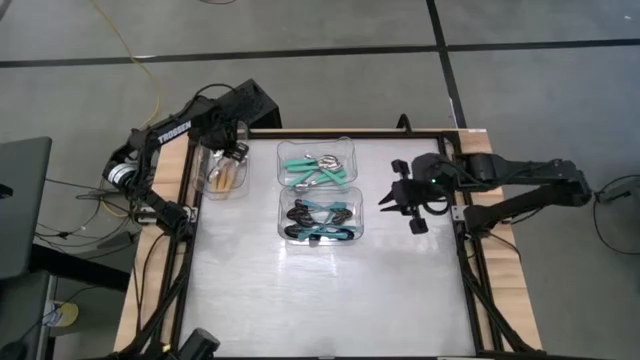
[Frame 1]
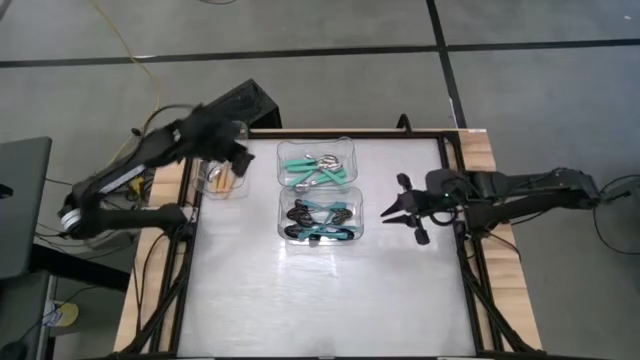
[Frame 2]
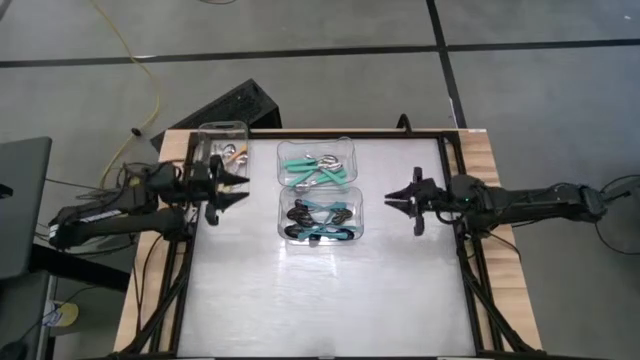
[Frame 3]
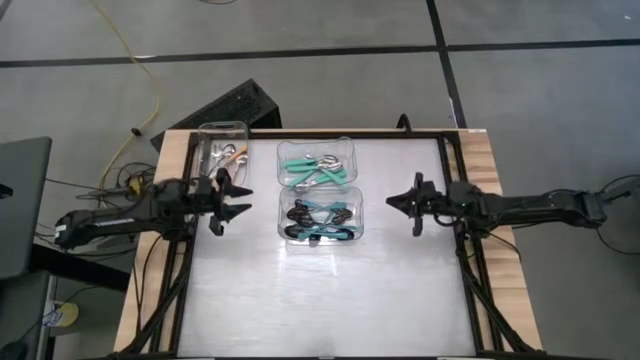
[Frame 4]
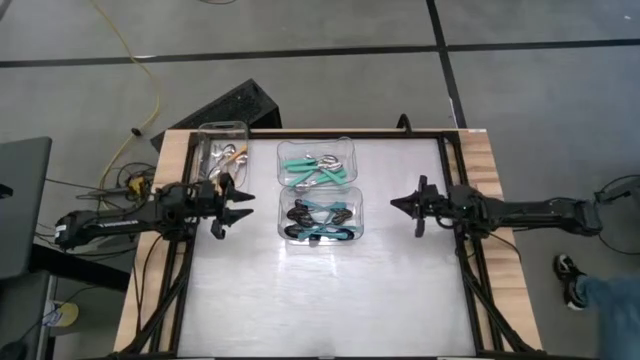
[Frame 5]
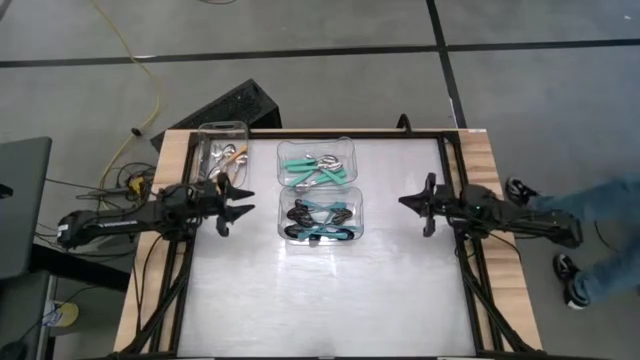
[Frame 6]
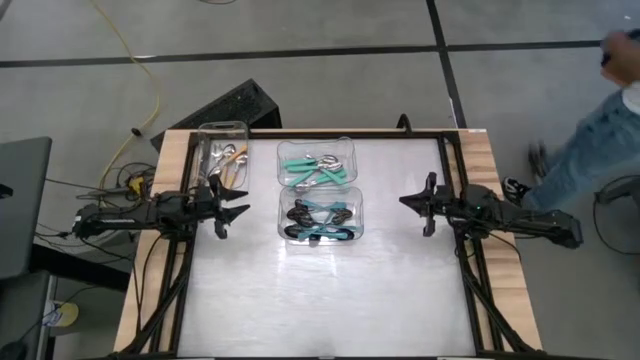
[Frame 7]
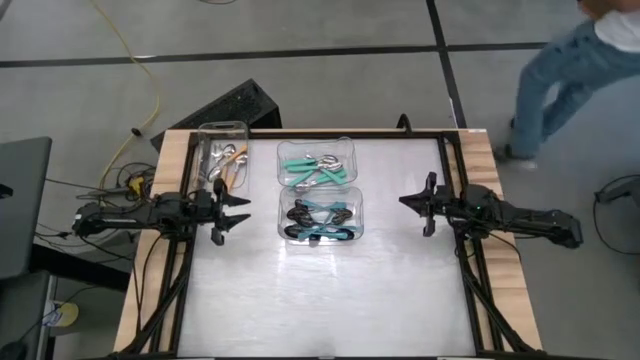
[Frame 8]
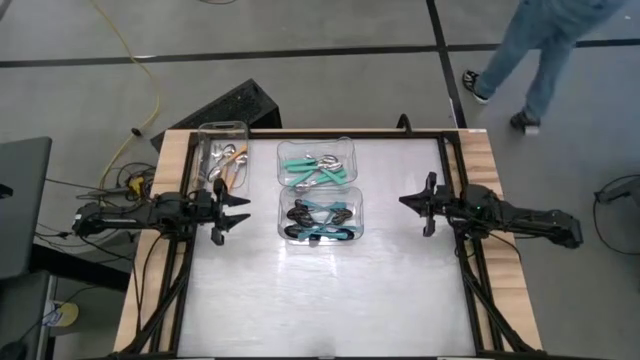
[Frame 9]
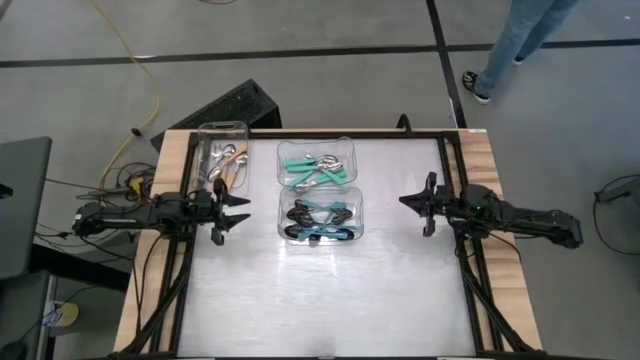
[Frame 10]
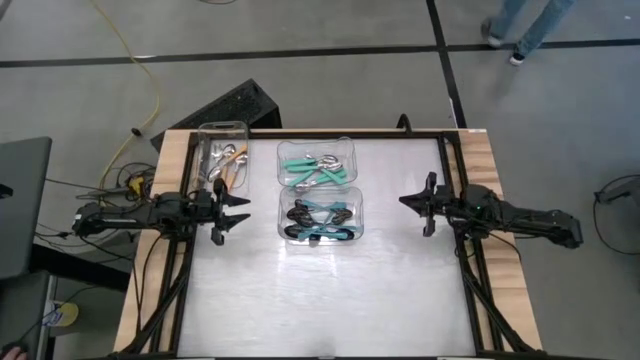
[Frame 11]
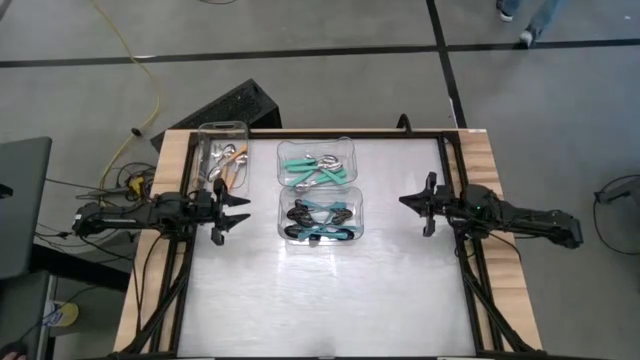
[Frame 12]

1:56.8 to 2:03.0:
Task: Sort silverware by color (type)
Return to Home Position

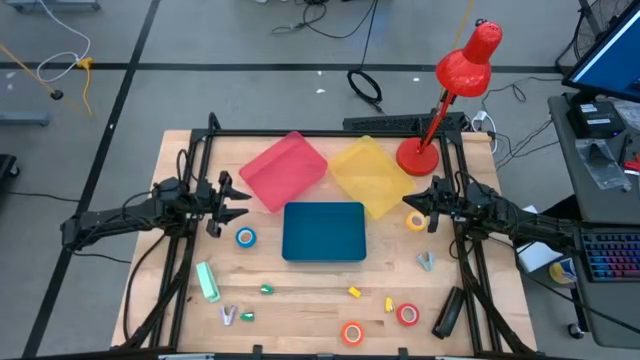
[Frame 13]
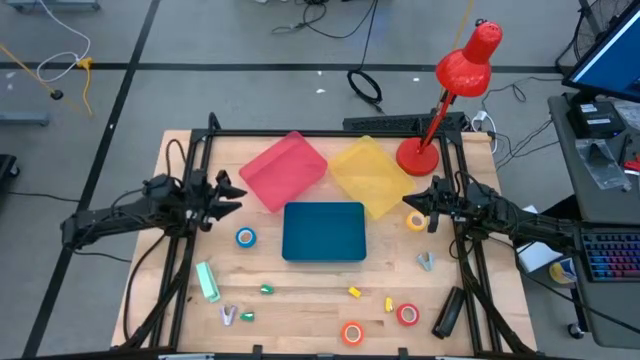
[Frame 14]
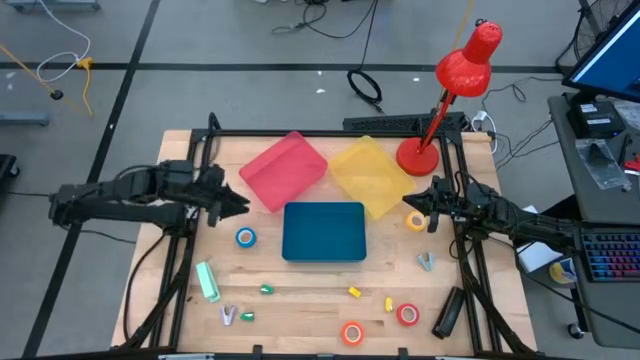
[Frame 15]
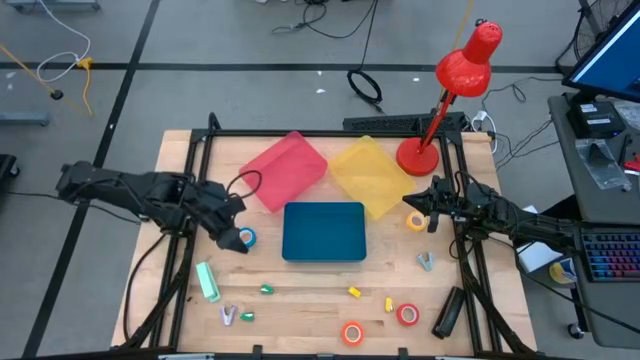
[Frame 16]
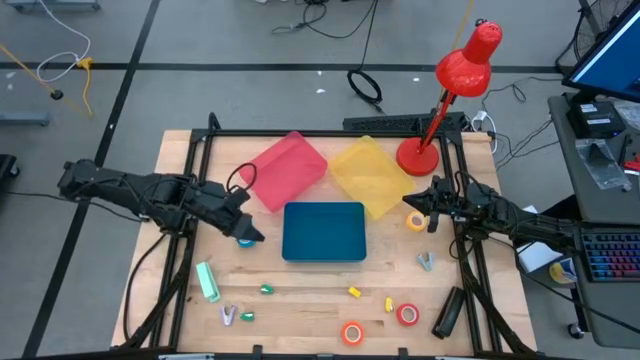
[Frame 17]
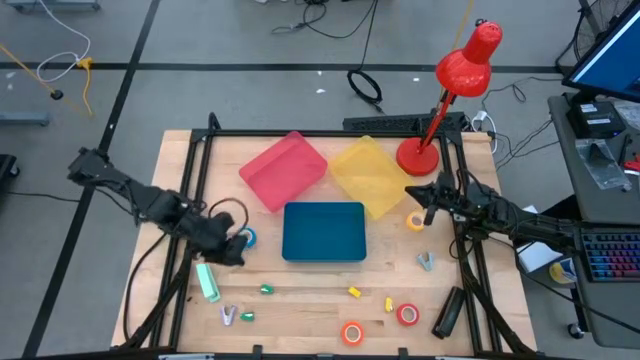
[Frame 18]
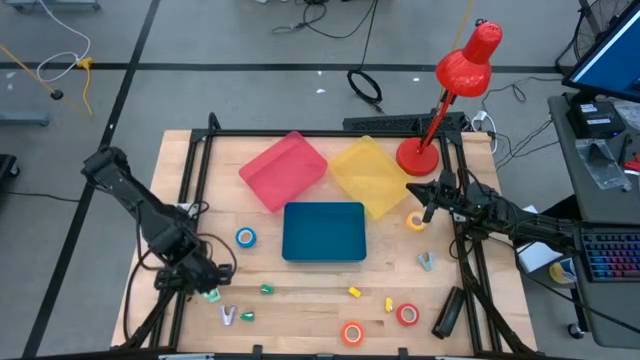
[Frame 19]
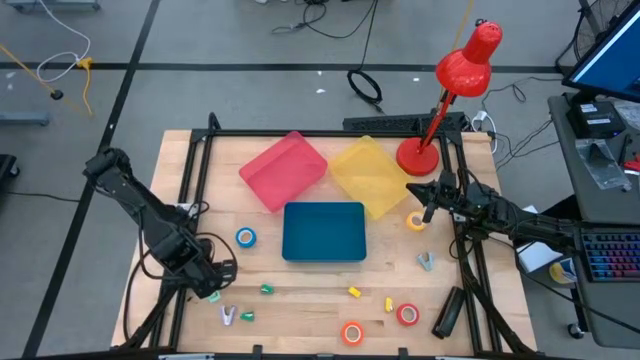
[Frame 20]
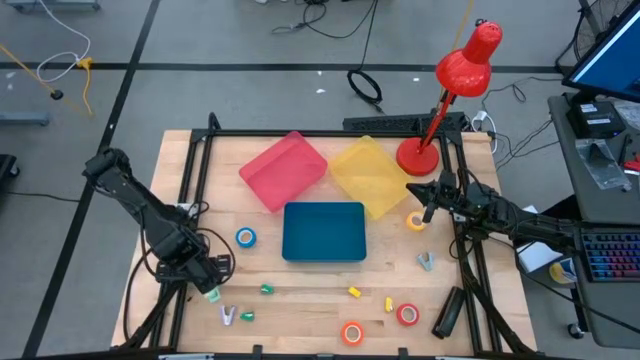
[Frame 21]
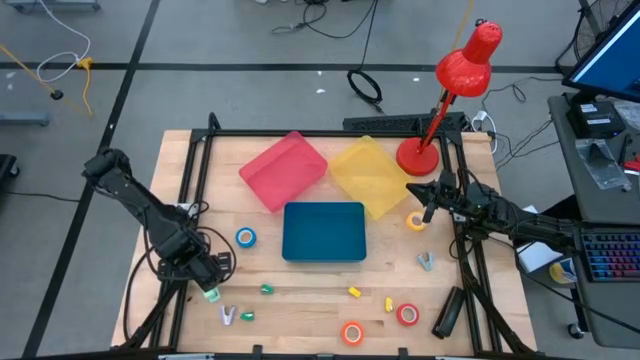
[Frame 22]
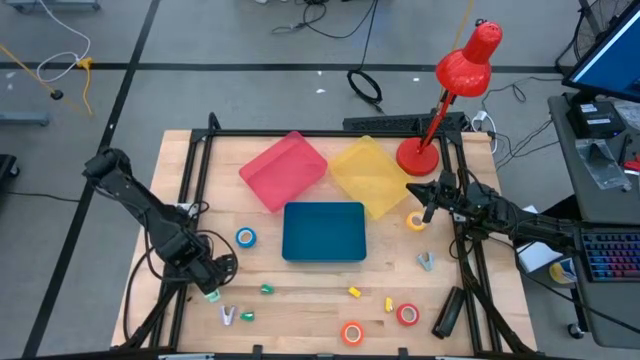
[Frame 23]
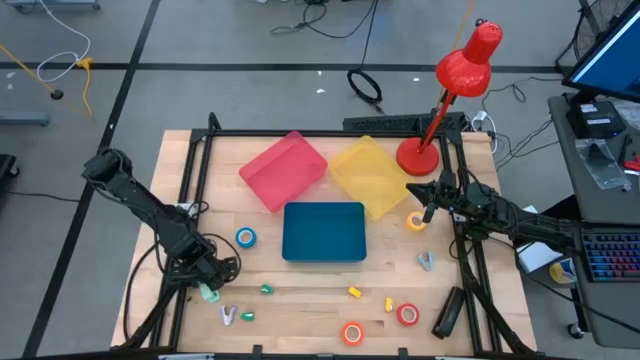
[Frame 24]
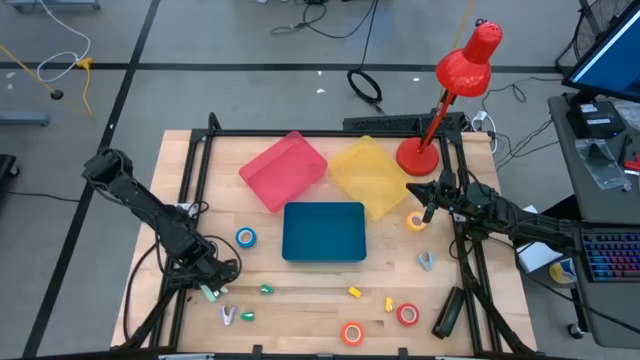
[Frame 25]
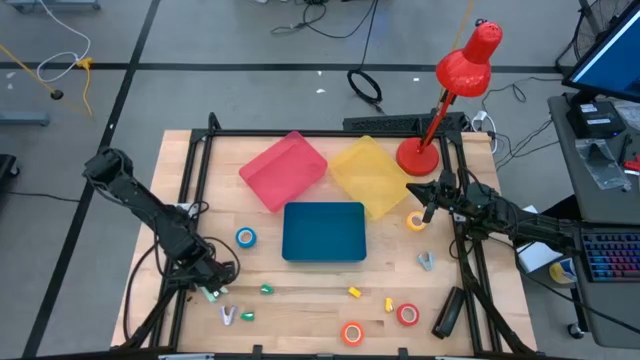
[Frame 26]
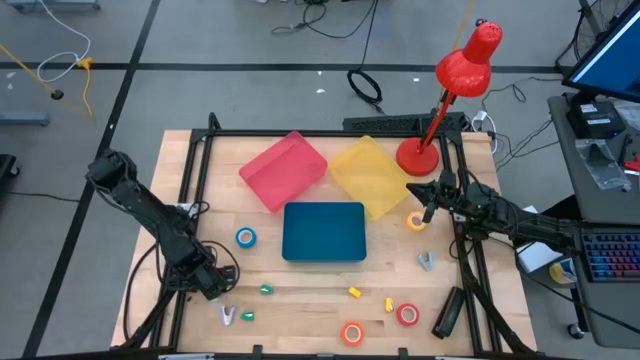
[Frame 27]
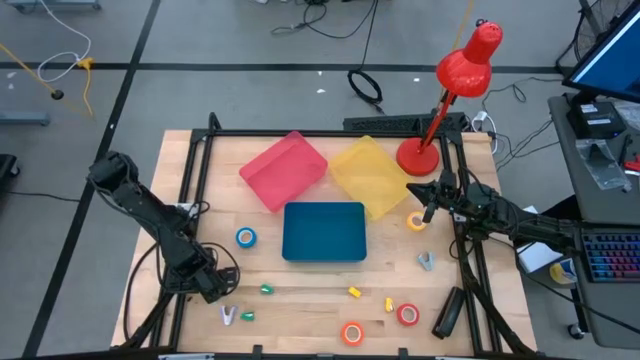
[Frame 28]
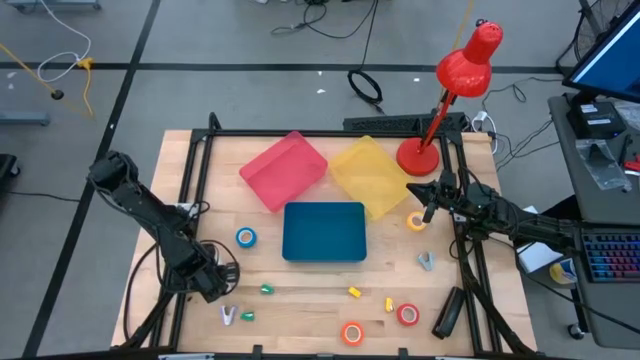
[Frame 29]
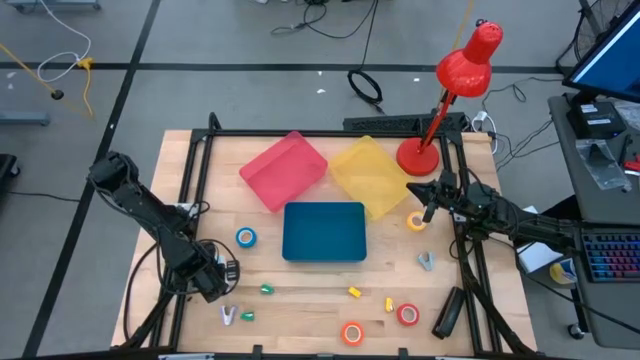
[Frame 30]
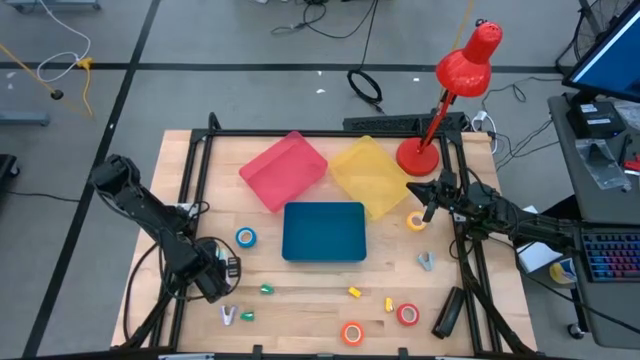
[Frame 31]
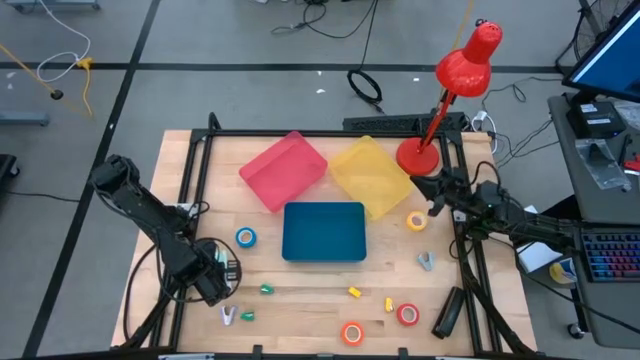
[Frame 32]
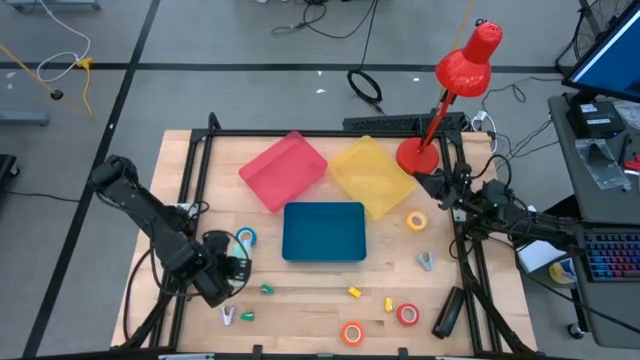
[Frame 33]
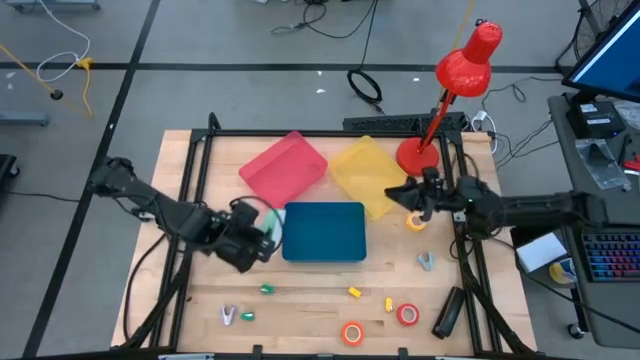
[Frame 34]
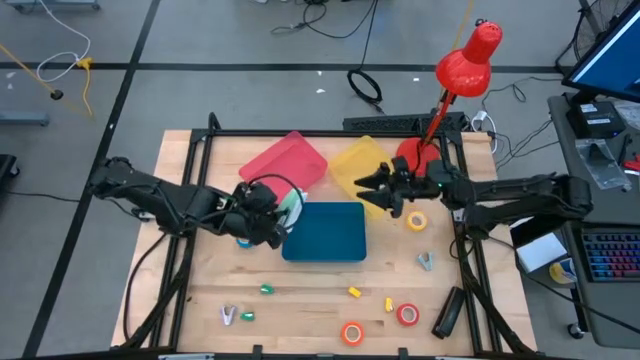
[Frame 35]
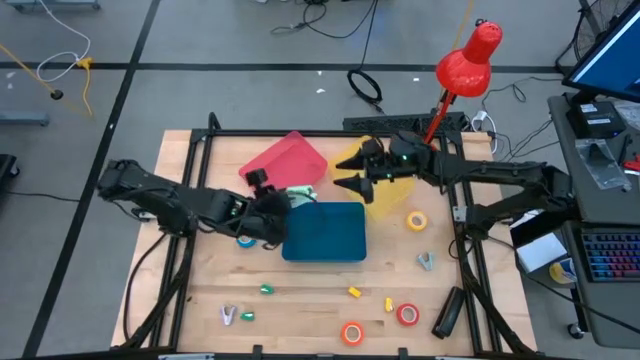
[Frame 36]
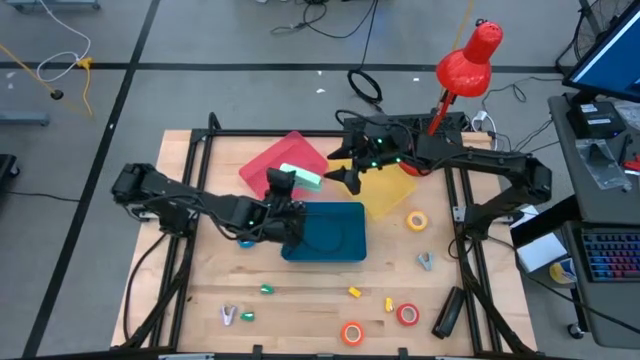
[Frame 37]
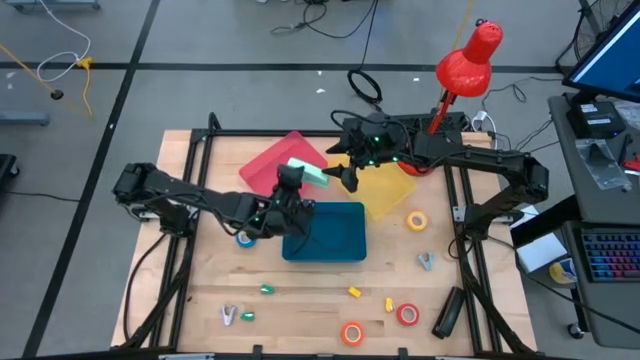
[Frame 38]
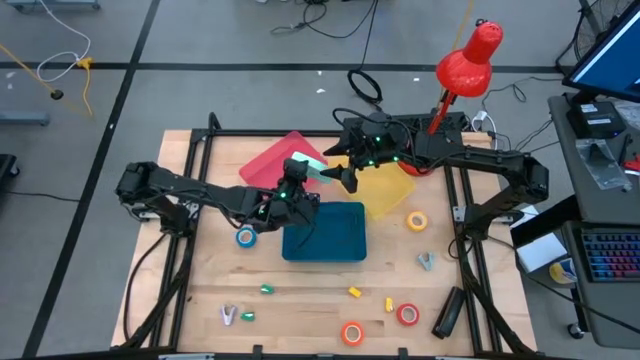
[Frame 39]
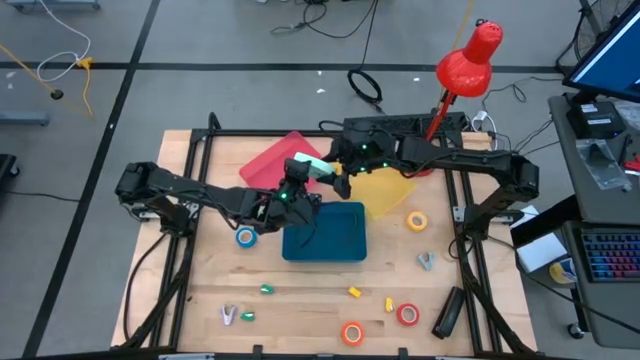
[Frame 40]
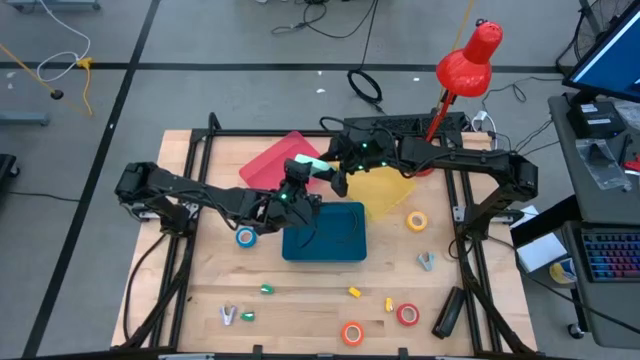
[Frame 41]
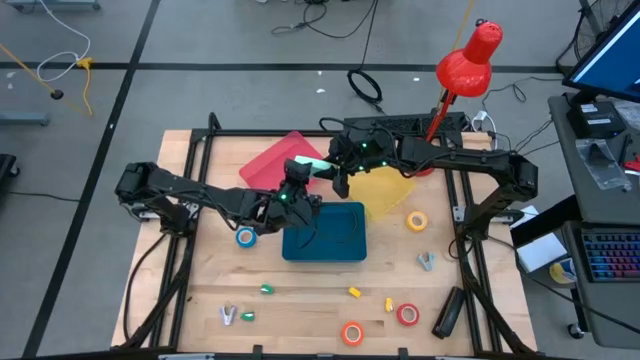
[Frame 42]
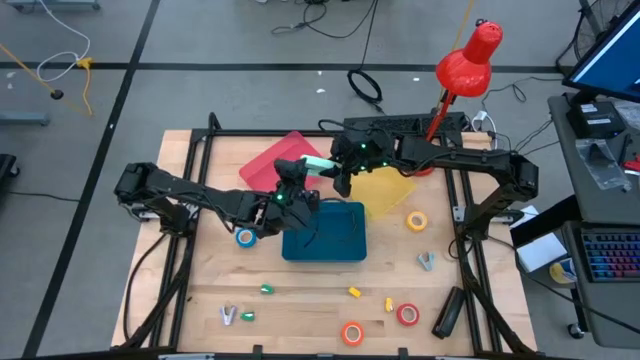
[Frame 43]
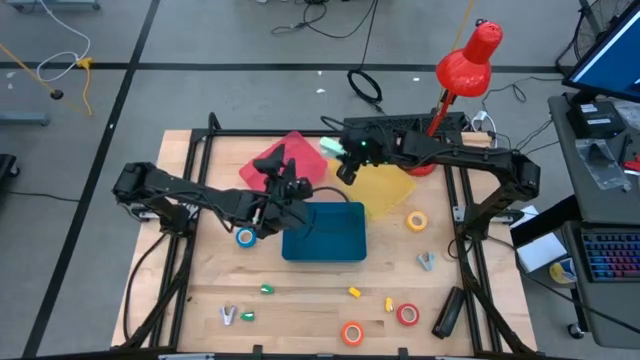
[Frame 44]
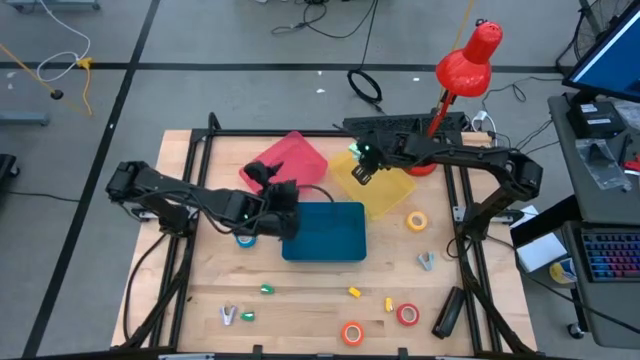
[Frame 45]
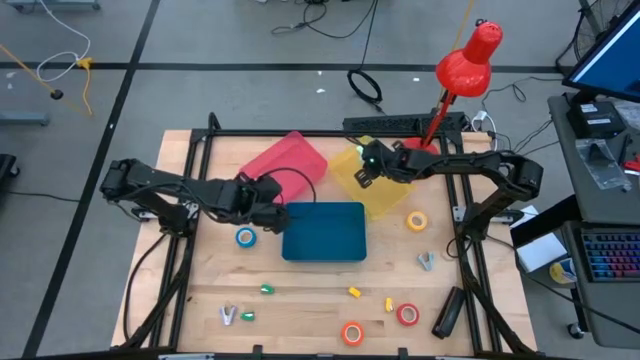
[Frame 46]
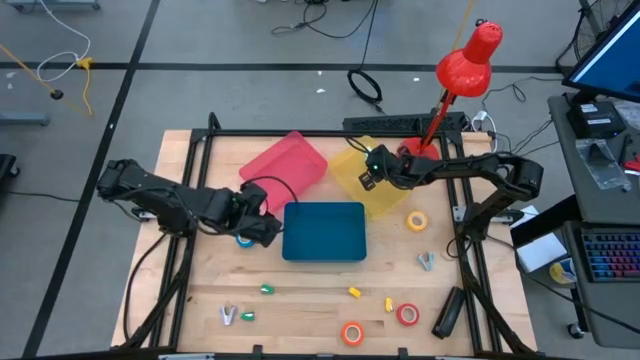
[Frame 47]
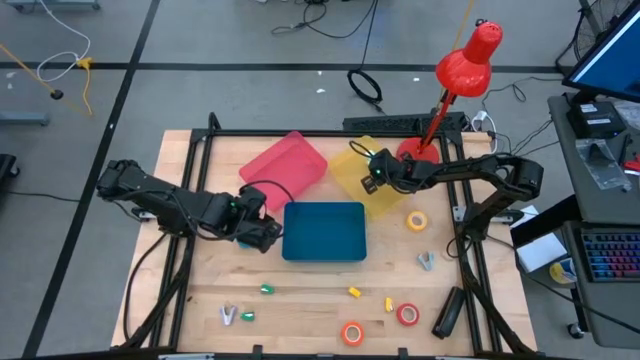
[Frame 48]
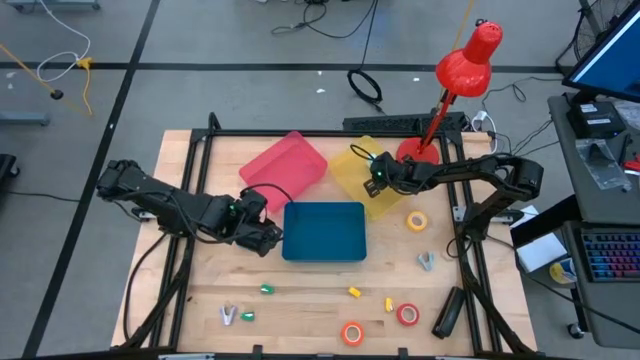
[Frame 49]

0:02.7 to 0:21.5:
Task: Pick and place Stapler, Stapler remover, tape
Put the light blue stapler into the yellow bin
